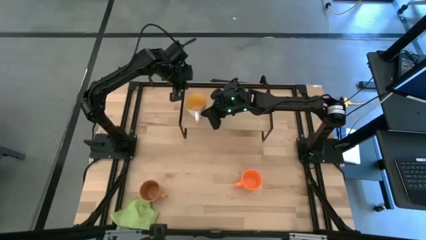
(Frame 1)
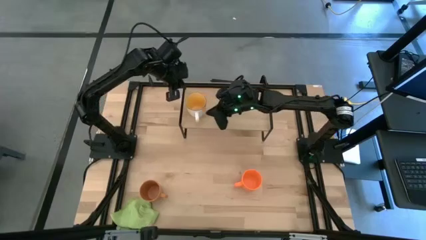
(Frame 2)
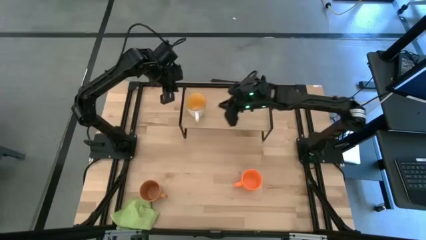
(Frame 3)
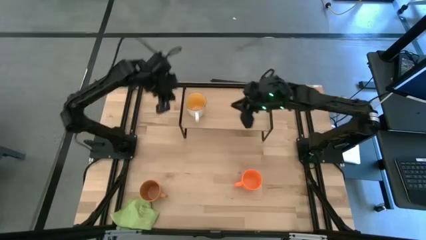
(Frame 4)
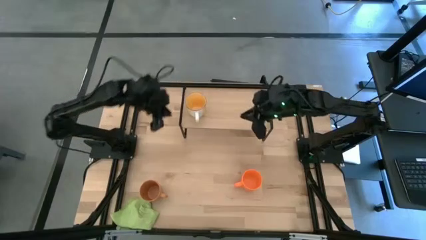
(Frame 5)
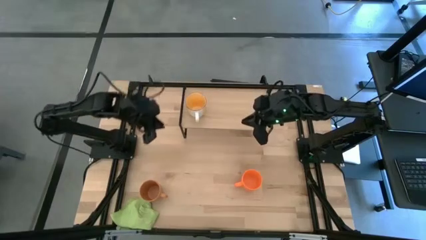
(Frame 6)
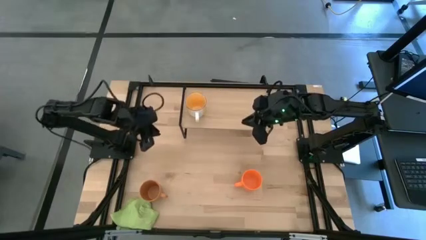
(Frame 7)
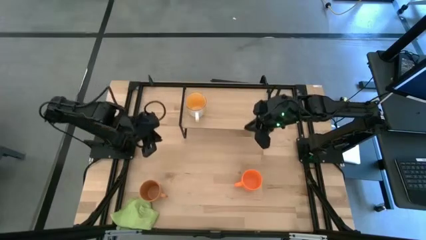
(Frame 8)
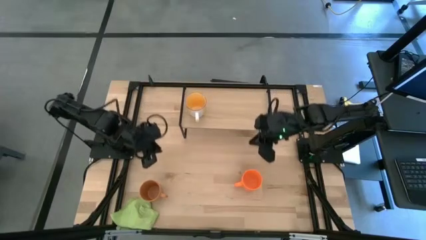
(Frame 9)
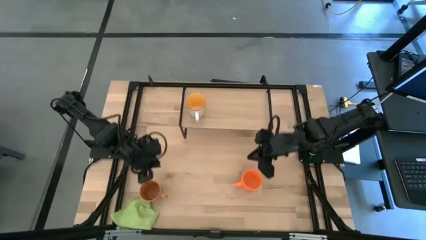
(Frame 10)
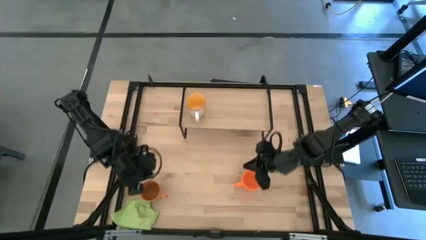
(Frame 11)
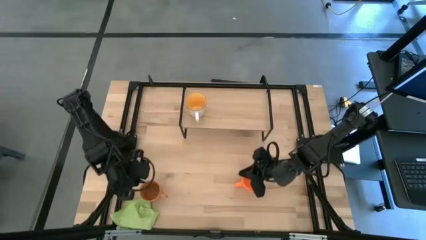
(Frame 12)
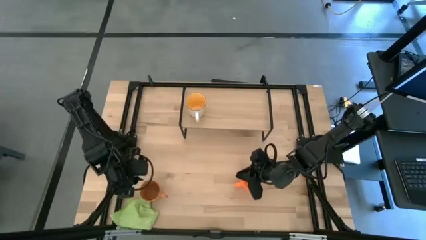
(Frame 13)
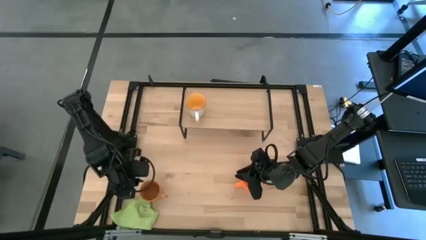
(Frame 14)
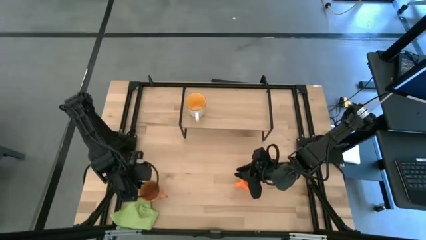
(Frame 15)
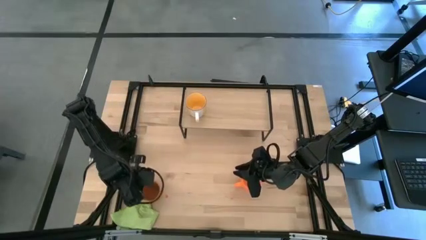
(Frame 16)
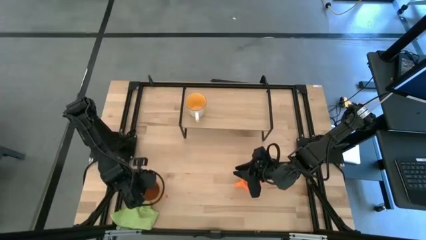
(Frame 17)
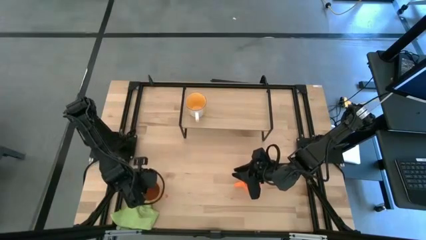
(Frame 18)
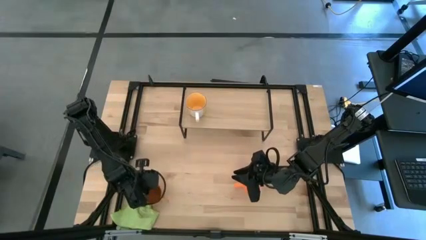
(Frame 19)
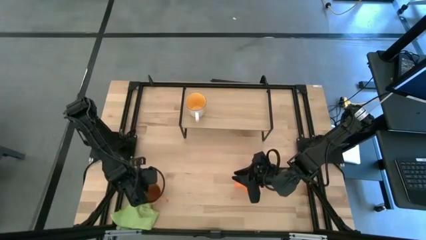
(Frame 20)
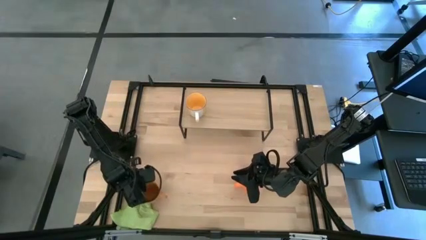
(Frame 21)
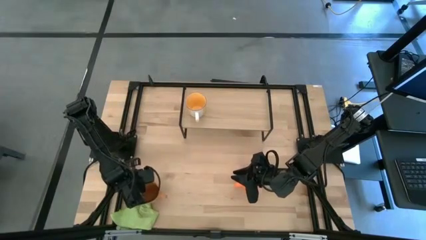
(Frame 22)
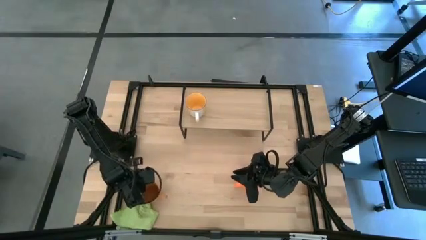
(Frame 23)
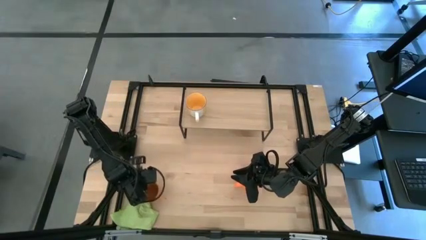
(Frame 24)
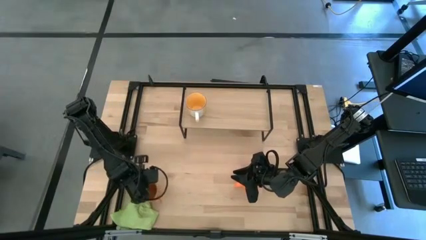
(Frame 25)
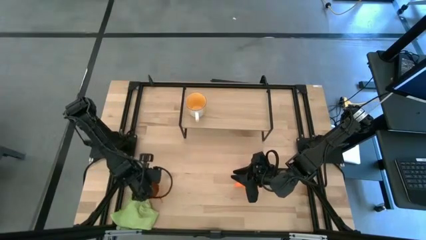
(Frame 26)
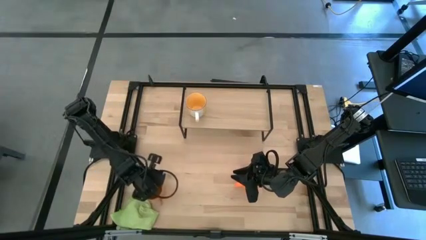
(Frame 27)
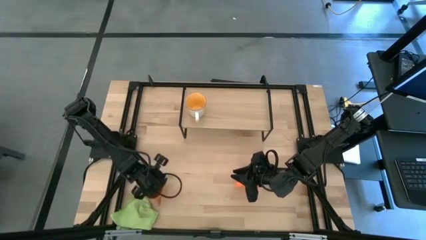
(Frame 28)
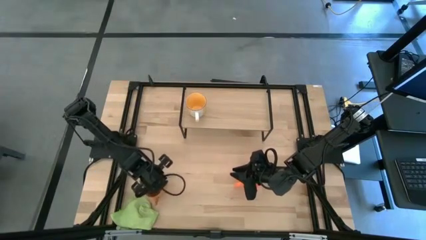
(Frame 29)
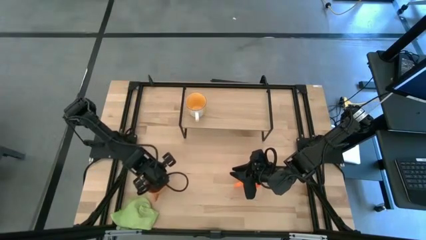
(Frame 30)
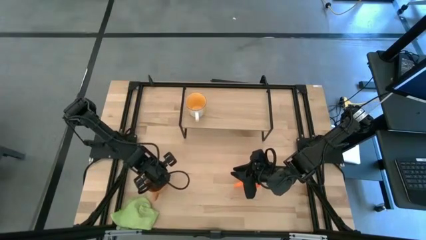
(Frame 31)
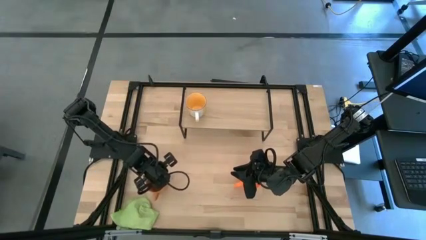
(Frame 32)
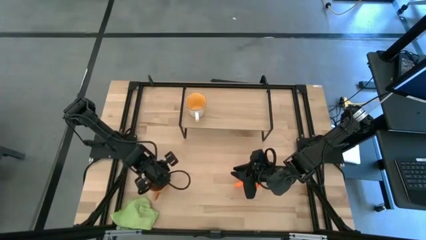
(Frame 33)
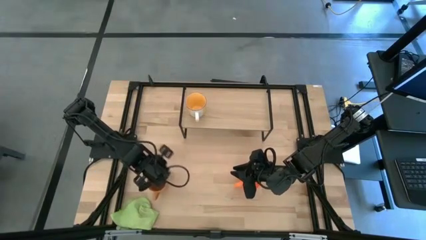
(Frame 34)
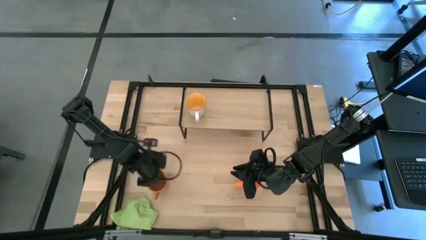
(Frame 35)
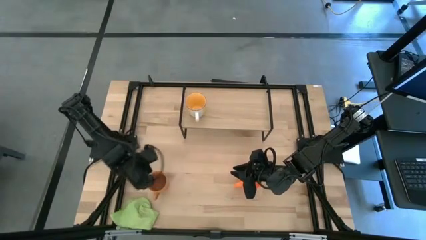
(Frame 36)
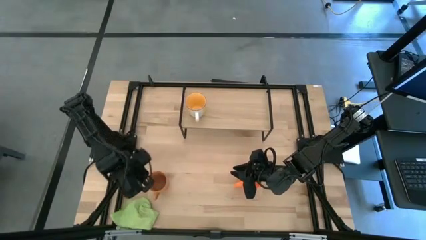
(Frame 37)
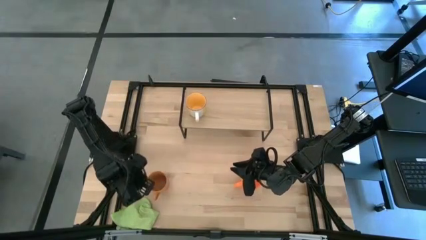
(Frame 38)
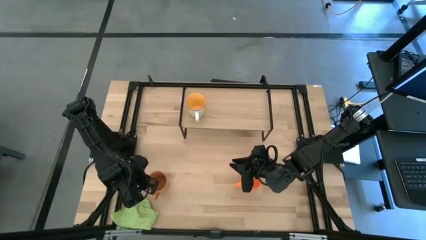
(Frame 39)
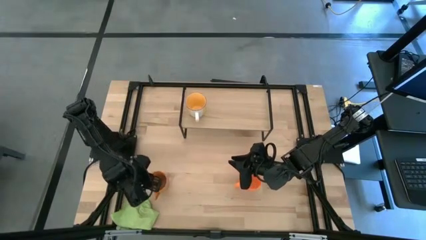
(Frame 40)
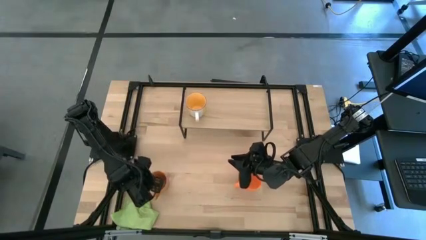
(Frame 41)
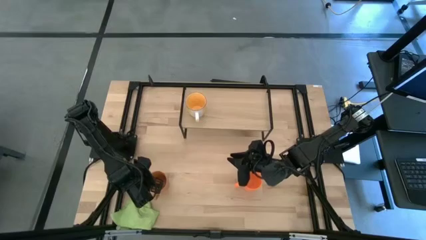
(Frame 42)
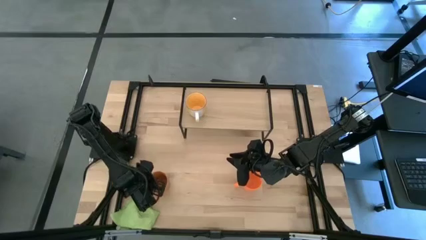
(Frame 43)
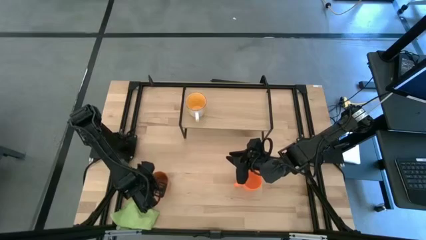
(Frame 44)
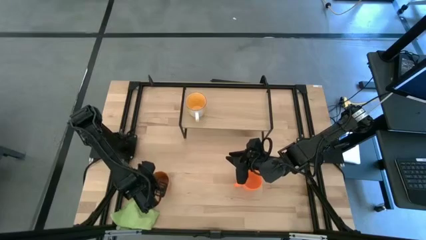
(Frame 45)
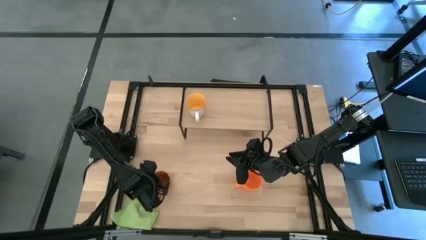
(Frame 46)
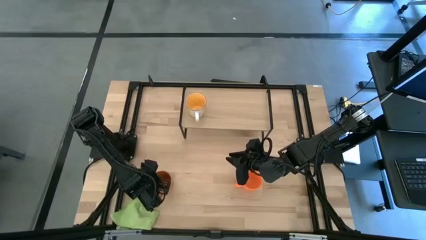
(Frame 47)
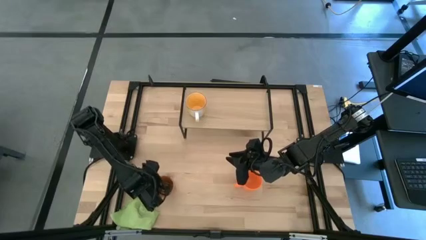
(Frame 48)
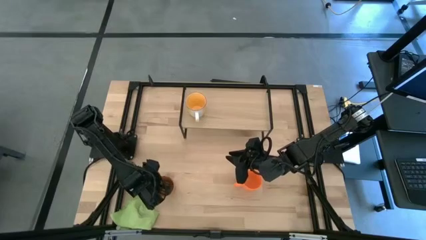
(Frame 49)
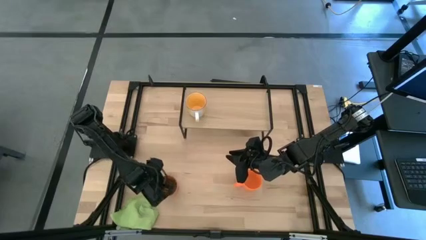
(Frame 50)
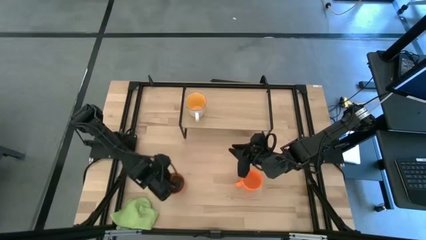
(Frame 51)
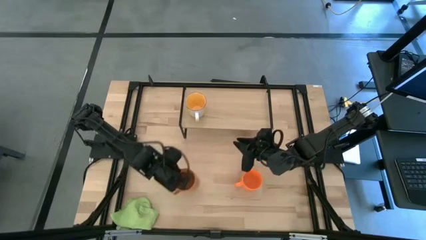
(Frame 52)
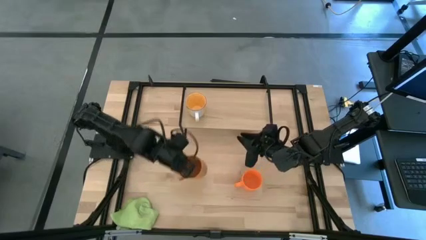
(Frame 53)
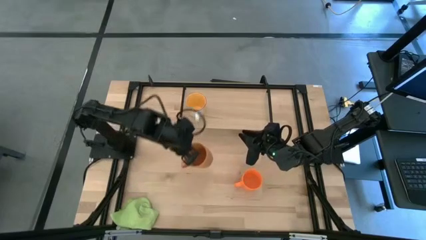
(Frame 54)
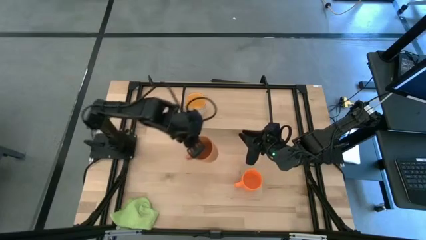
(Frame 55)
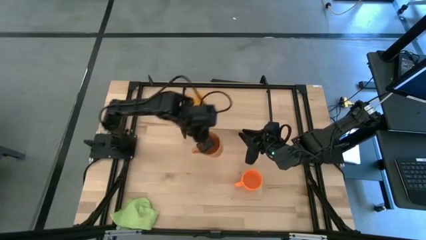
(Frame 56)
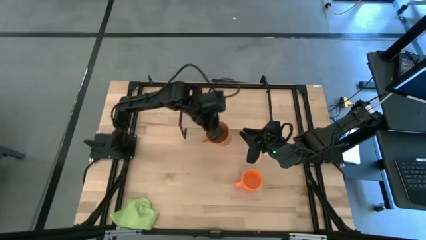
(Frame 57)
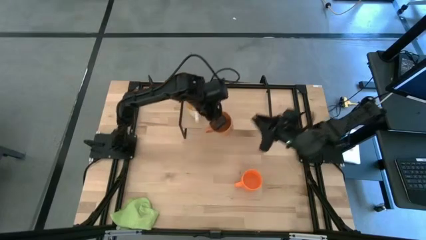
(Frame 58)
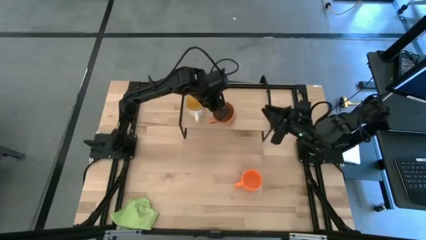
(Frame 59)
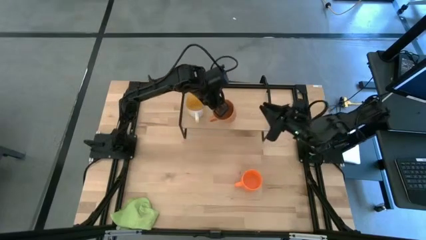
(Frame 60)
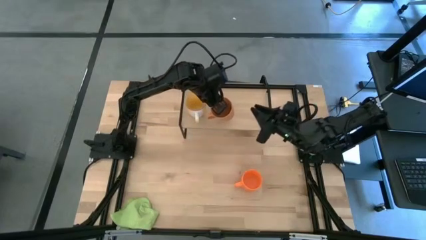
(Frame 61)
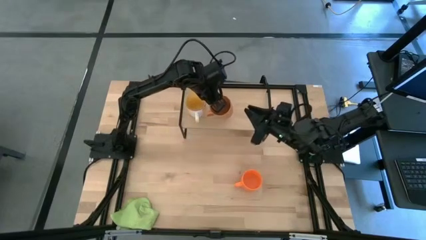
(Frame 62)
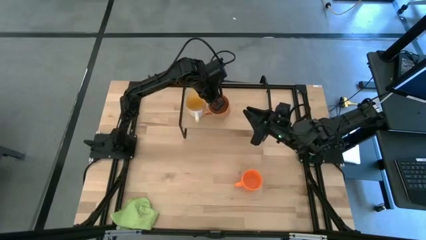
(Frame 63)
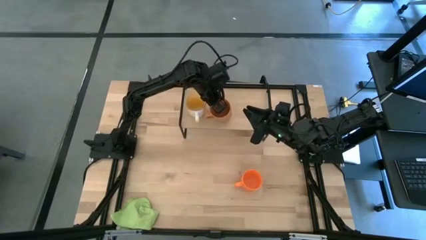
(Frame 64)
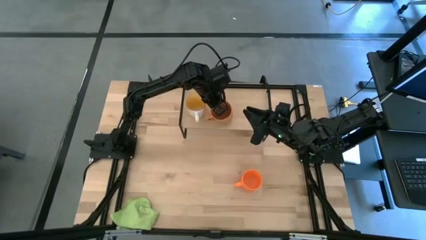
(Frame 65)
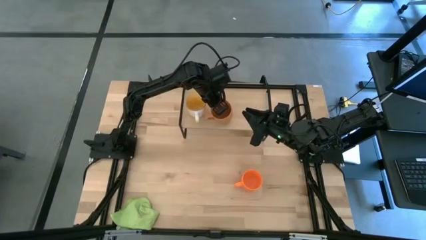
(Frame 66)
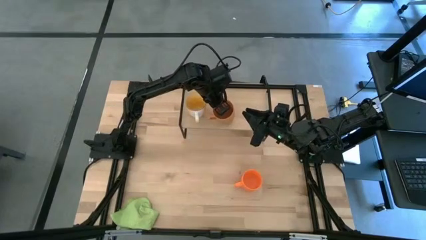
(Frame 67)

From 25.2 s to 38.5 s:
Task: Stack small to large cups/mugs on shelf
Put the brown mug on the shelf

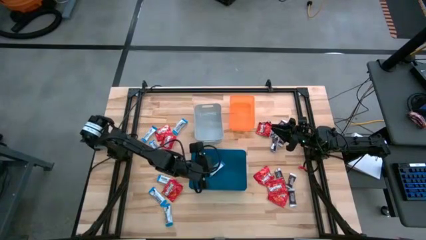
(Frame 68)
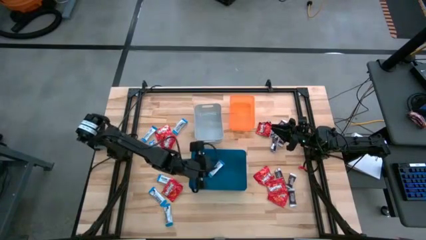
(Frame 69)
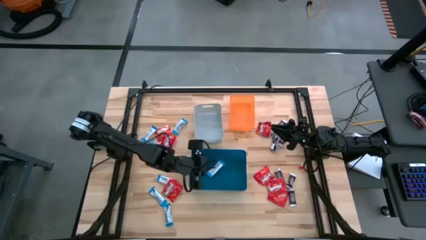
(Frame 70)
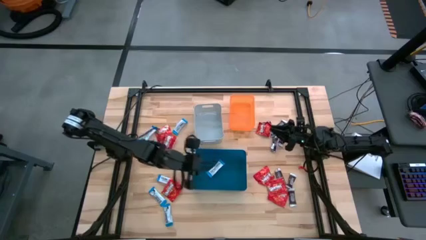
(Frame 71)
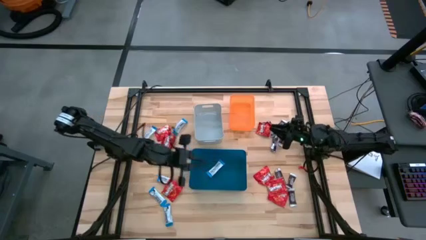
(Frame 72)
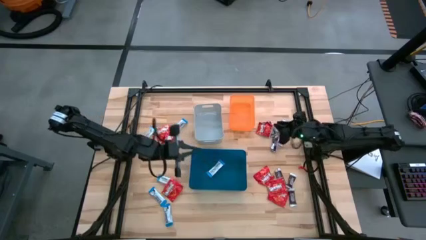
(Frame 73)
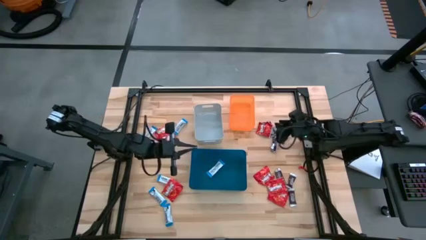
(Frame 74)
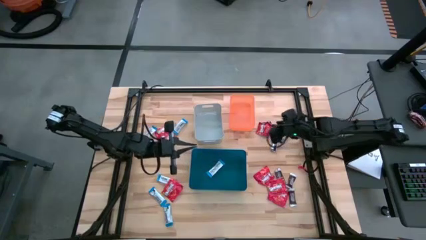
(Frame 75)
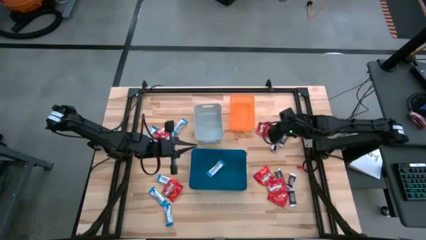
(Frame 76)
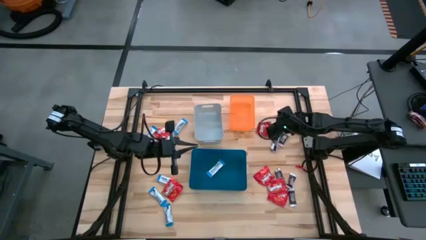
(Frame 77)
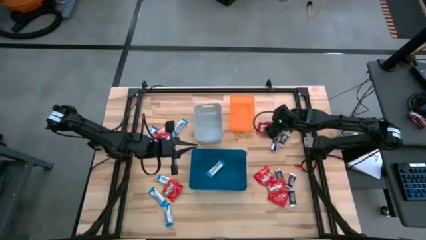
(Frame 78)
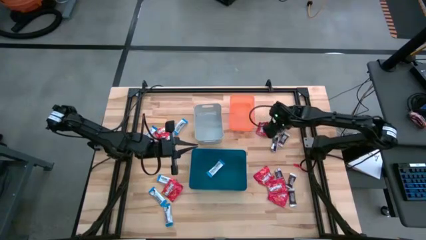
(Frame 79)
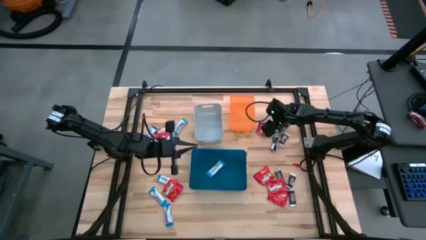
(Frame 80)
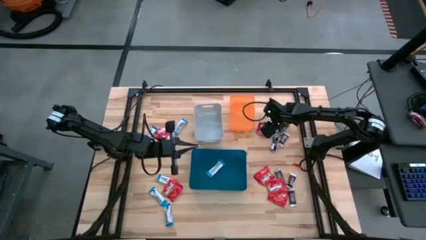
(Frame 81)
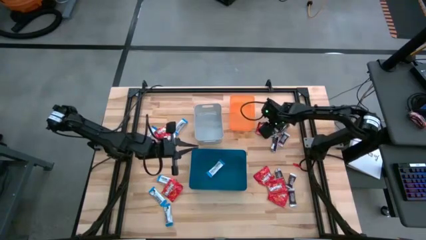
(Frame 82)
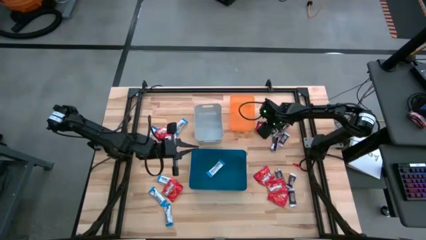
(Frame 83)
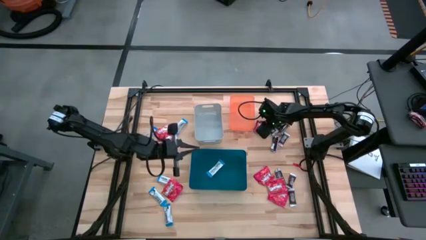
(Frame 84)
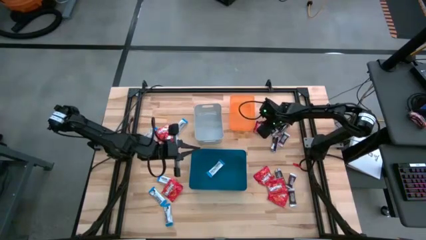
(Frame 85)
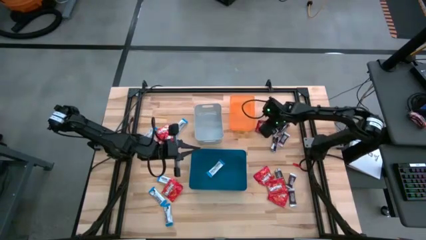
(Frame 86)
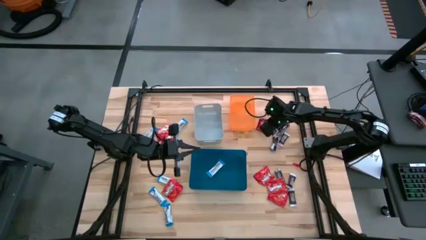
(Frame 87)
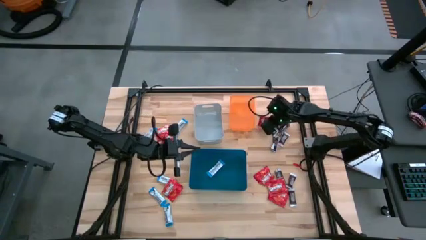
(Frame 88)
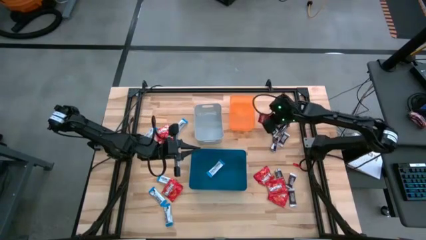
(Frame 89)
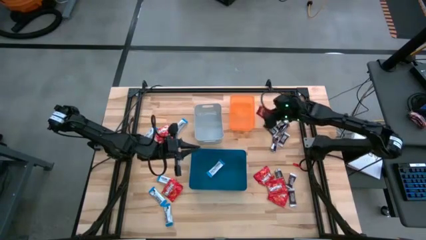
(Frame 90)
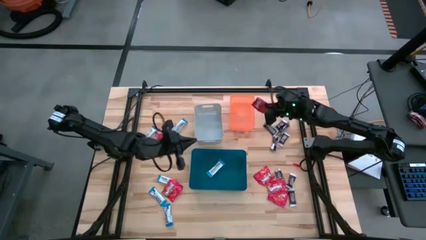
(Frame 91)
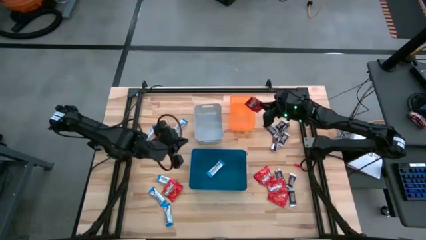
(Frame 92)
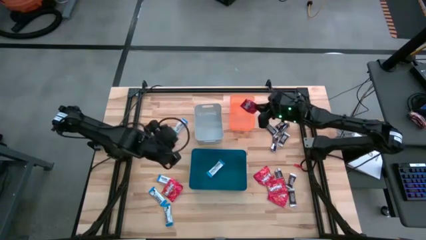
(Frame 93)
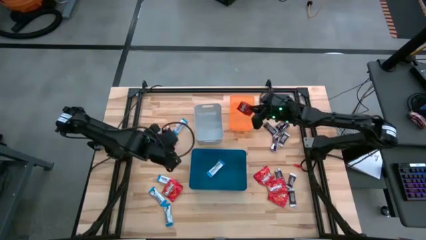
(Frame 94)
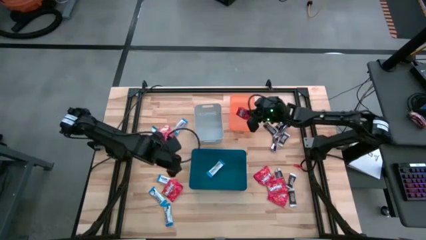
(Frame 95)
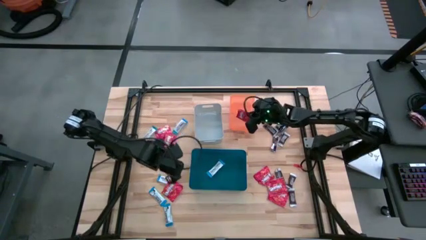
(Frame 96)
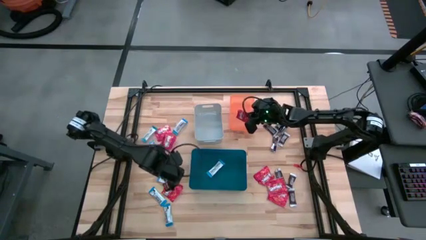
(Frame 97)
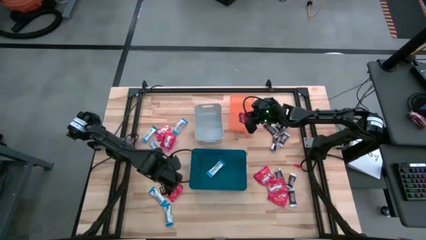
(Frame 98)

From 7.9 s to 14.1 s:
Task: Sort candy
Put the red chocolate into the orange bin
